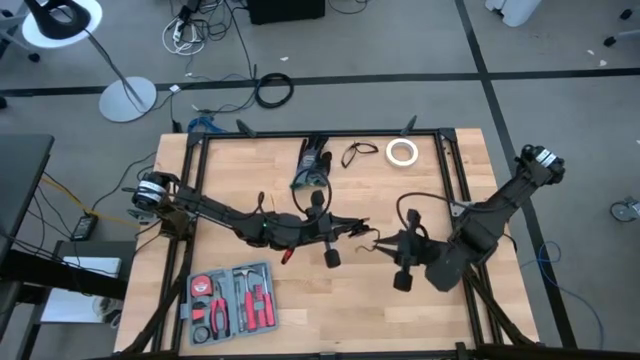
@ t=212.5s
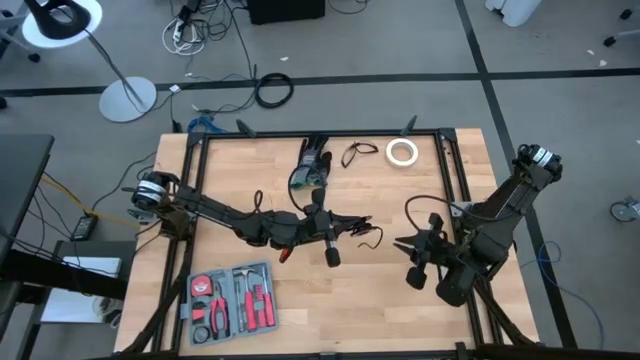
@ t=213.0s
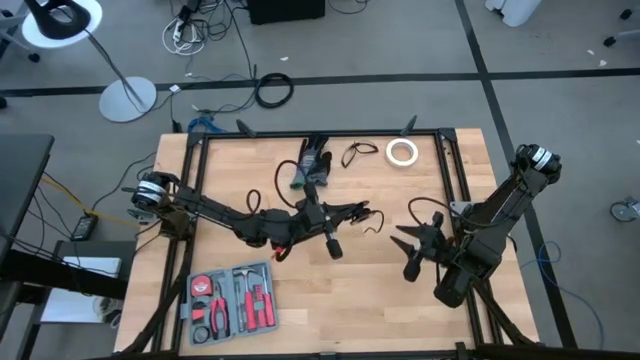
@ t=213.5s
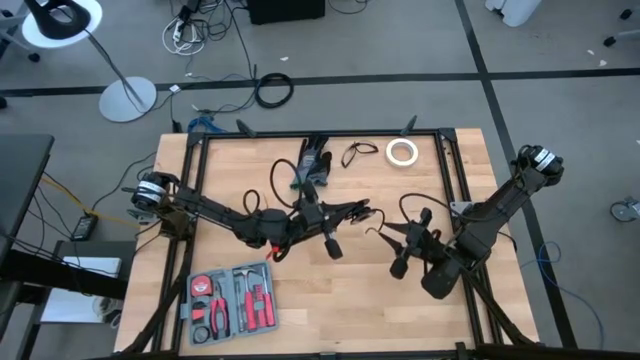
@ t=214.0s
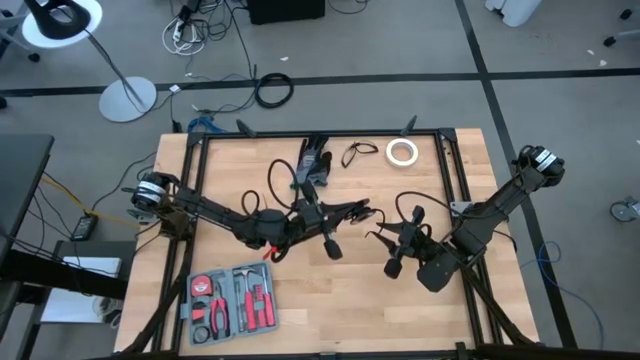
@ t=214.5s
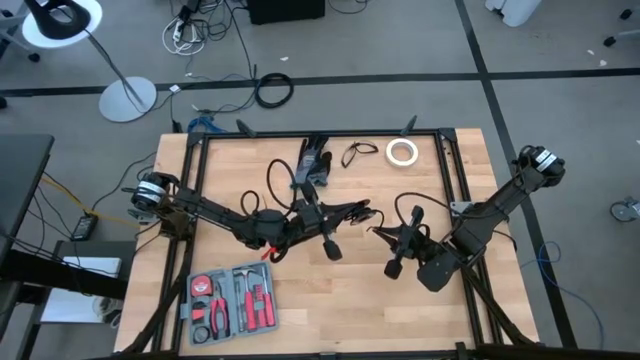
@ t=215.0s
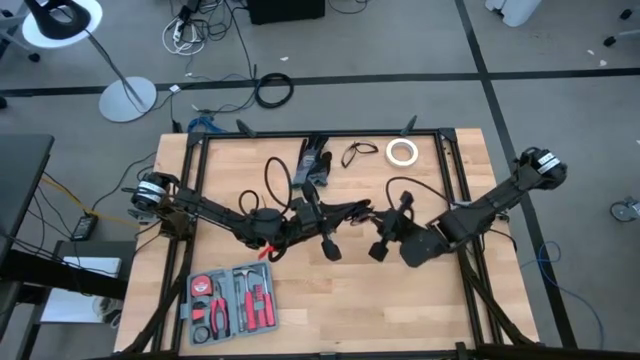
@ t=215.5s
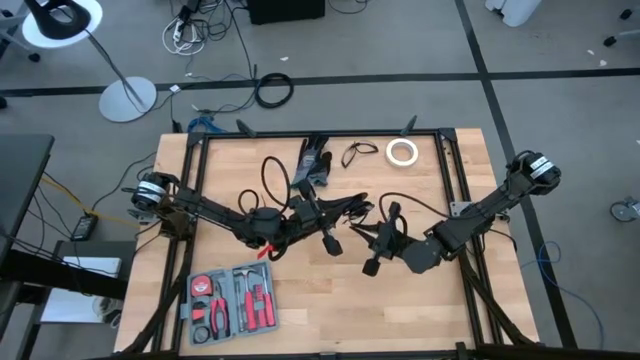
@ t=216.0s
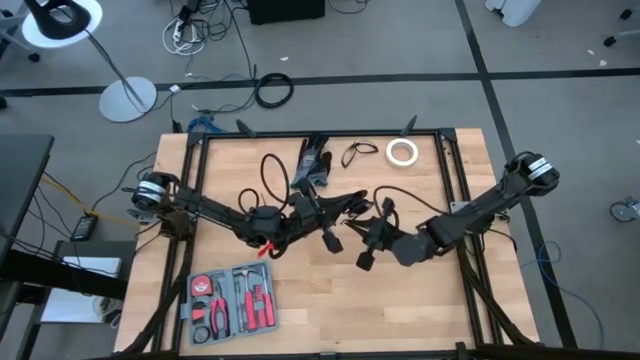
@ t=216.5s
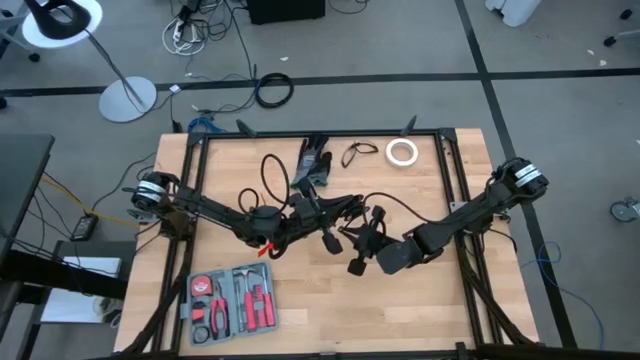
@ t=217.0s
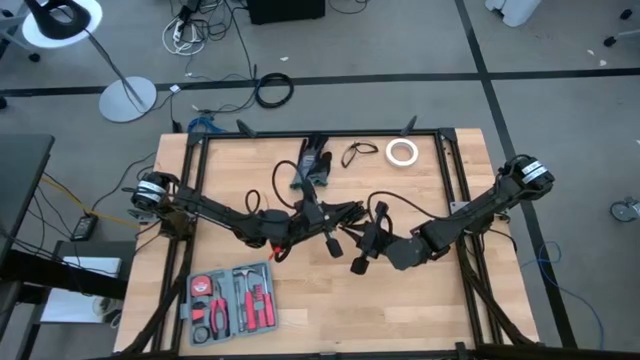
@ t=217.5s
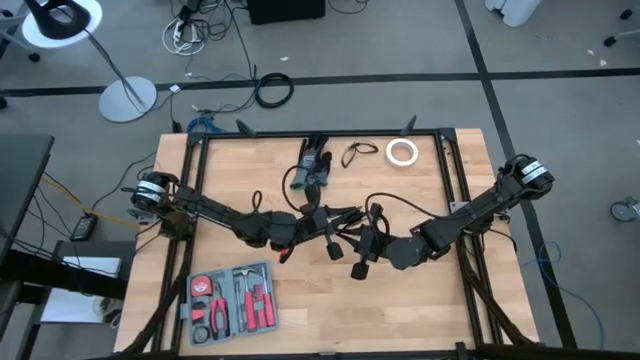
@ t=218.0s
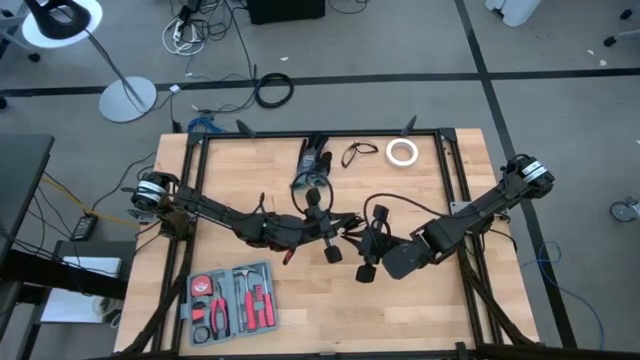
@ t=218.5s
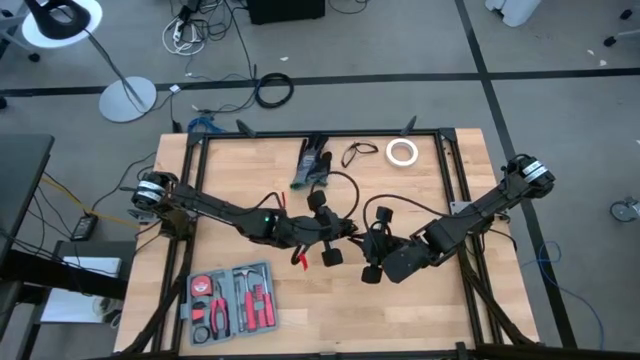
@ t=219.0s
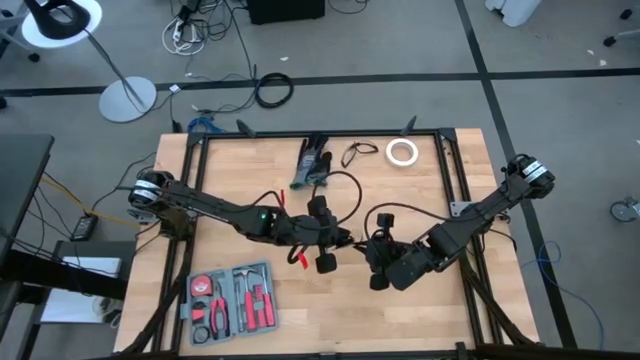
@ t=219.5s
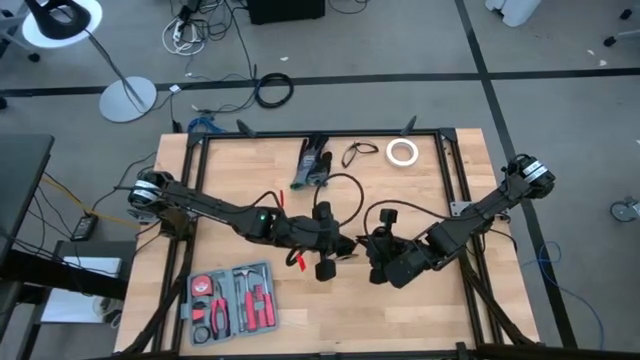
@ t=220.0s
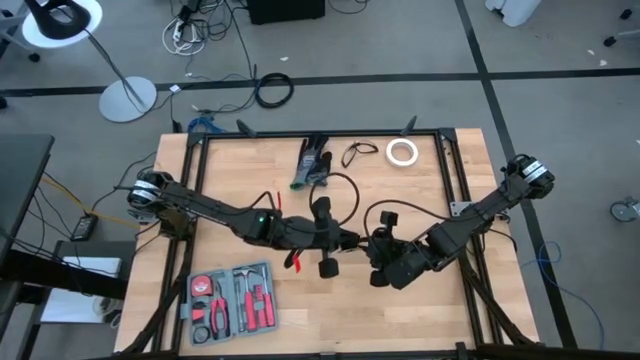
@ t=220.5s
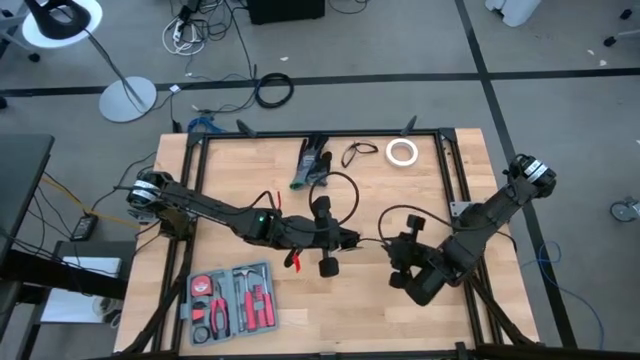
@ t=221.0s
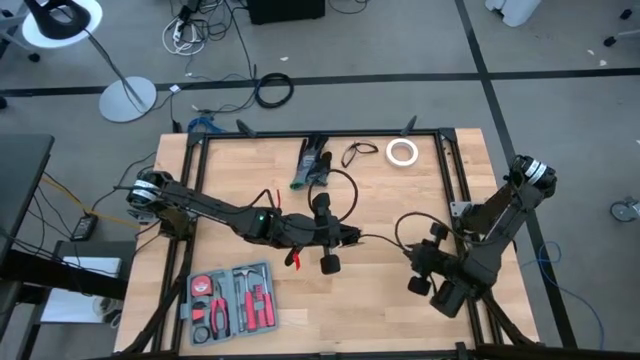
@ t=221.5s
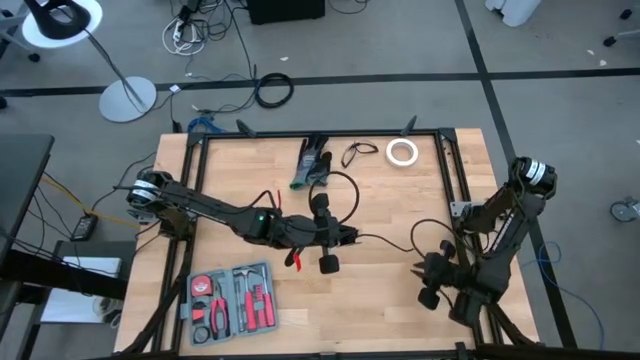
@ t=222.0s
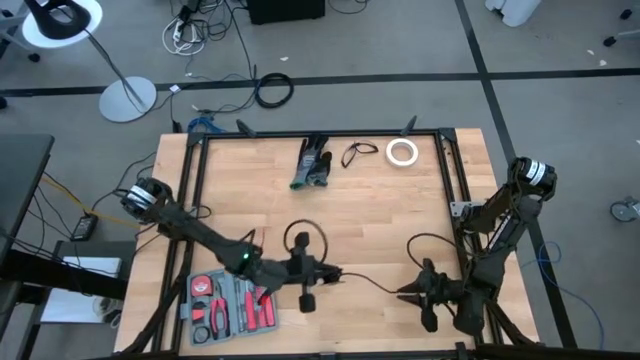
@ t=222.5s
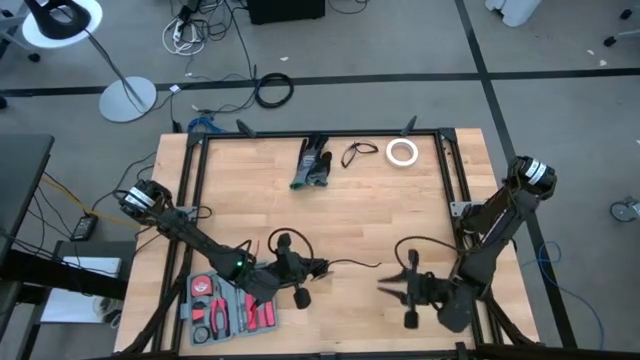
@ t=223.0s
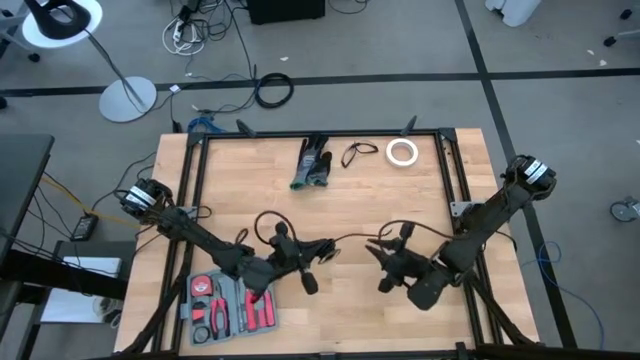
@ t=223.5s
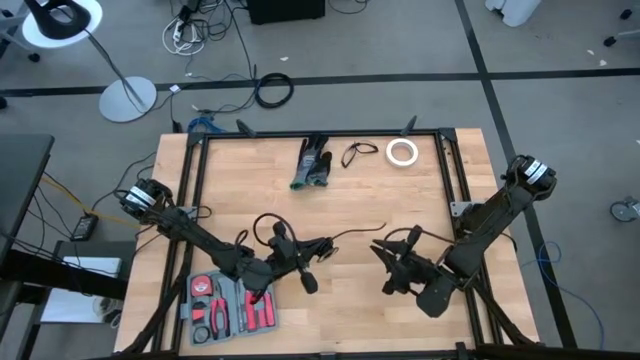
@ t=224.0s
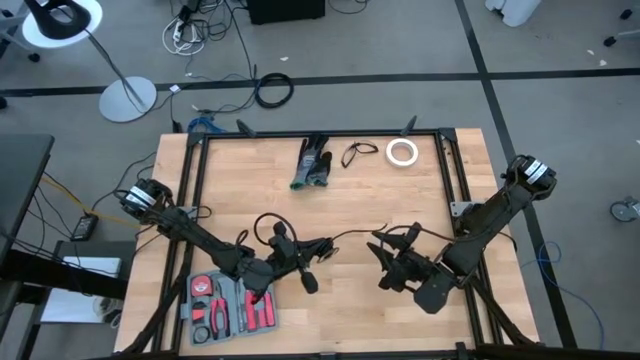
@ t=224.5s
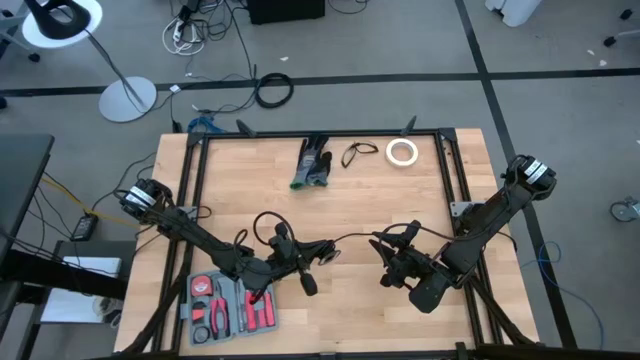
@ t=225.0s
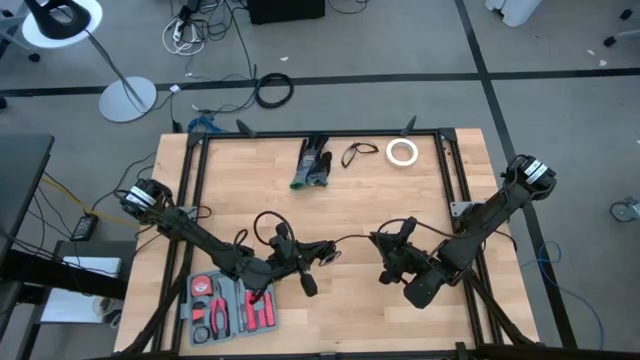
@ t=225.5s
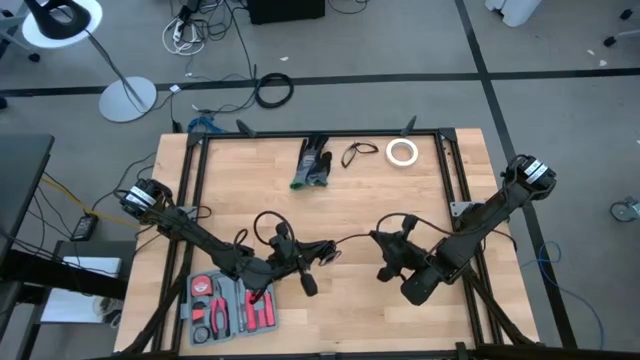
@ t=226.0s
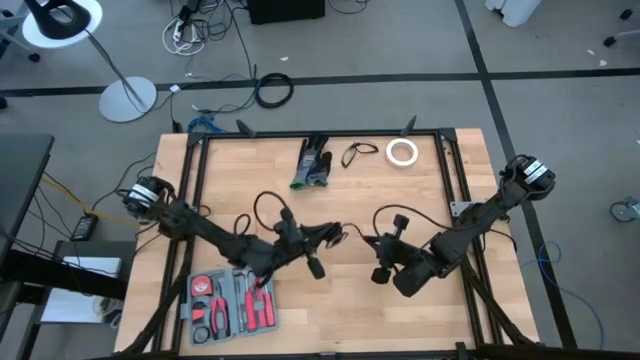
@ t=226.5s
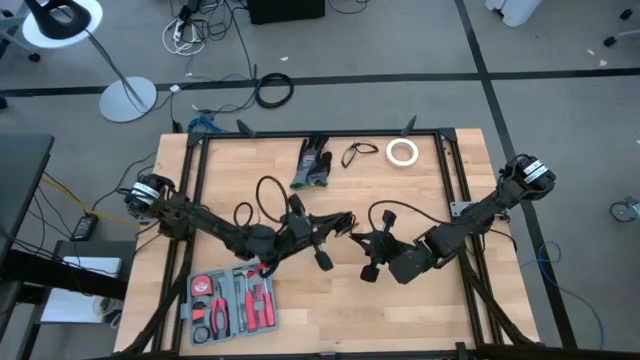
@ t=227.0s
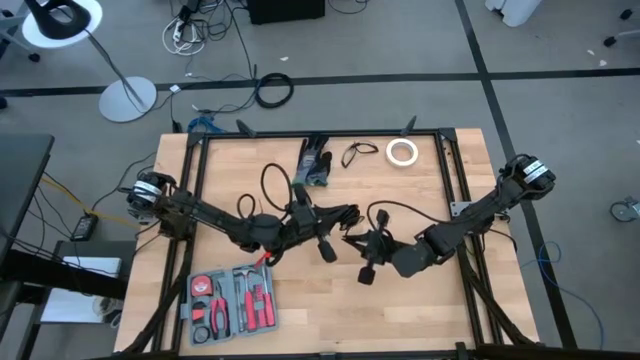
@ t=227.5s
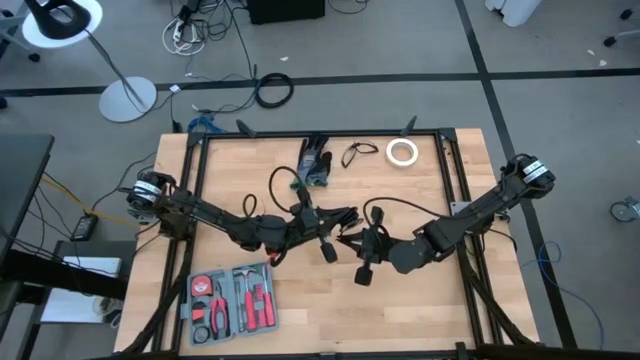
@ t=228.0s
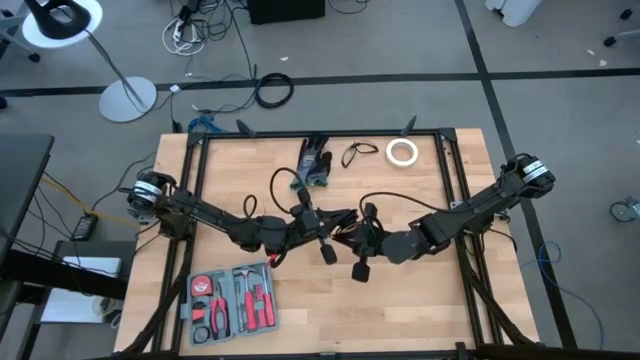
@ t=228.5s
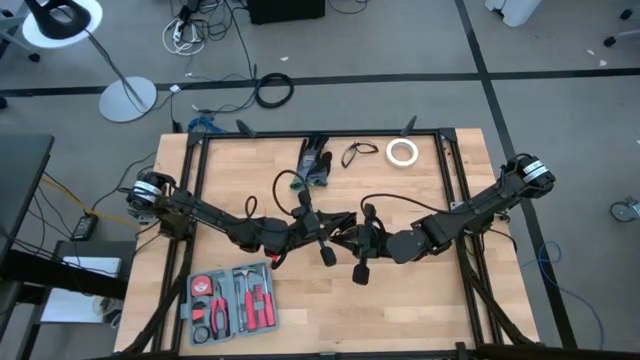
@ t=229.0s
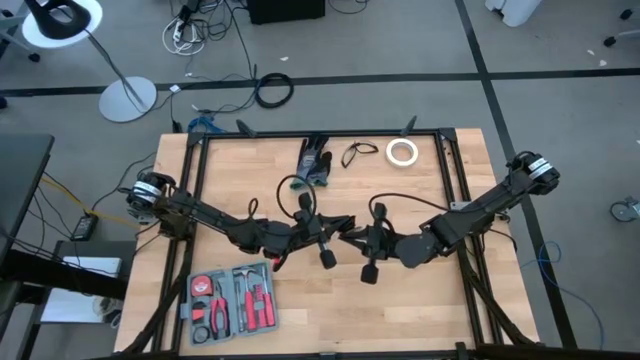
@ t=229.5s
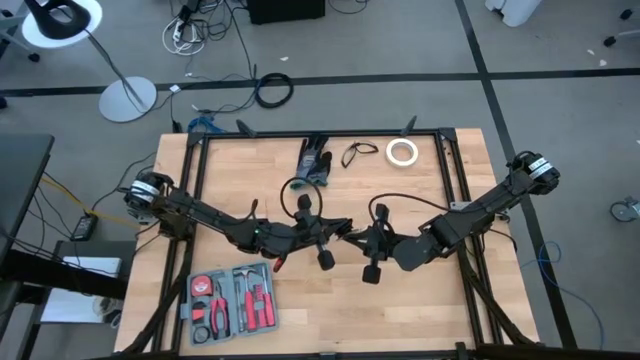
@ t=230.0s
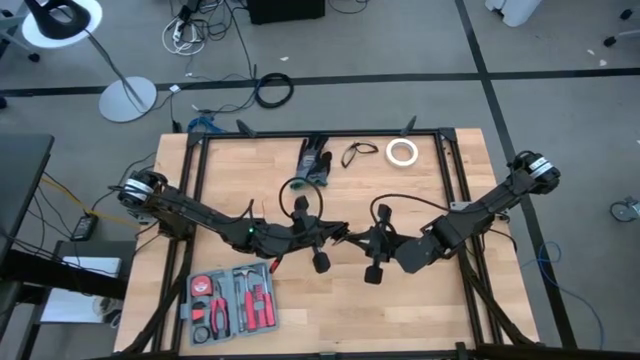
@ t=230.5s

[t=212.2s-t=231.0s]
Task: Coil cords
Coil the black wire into a spool

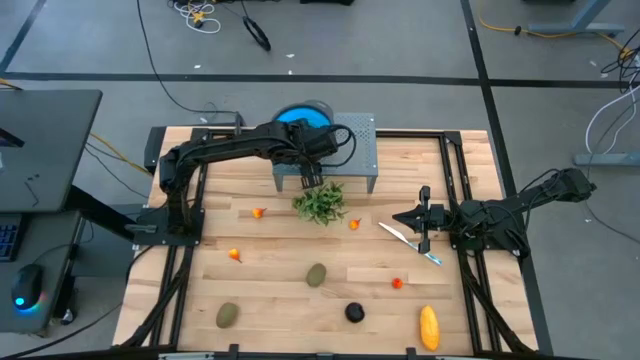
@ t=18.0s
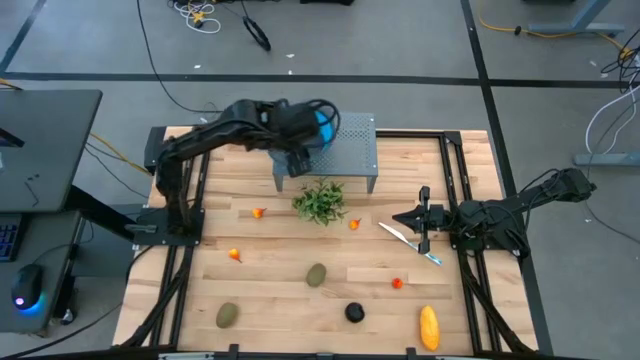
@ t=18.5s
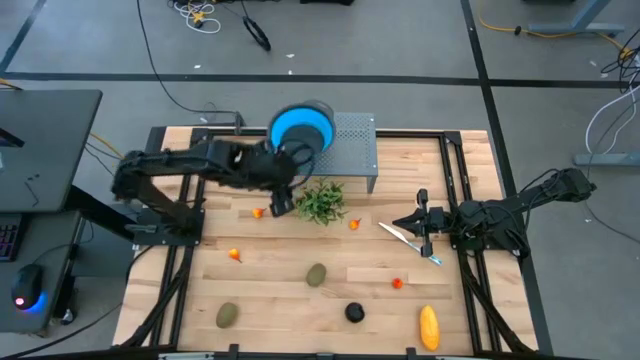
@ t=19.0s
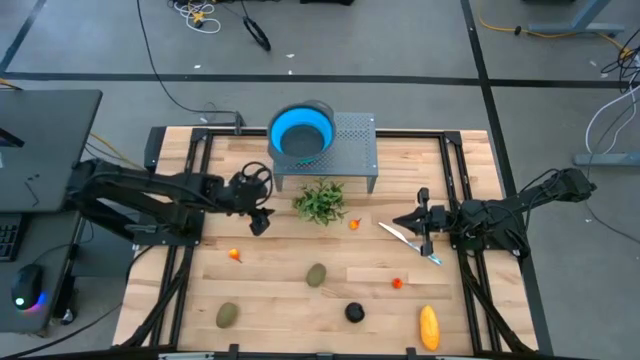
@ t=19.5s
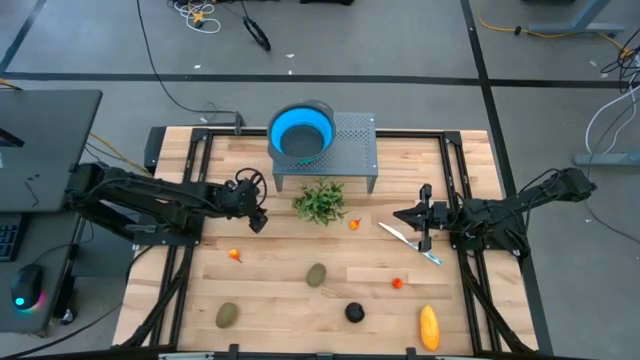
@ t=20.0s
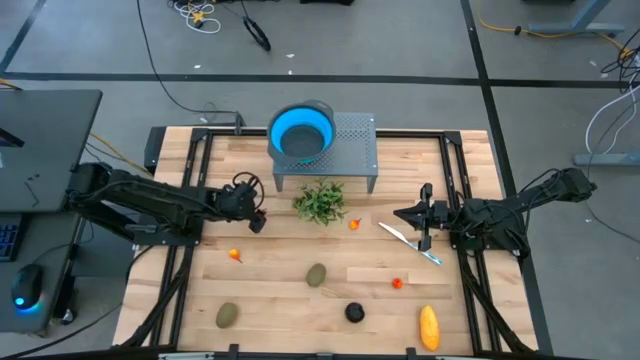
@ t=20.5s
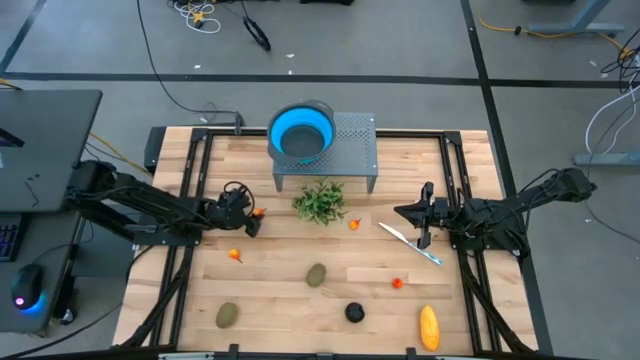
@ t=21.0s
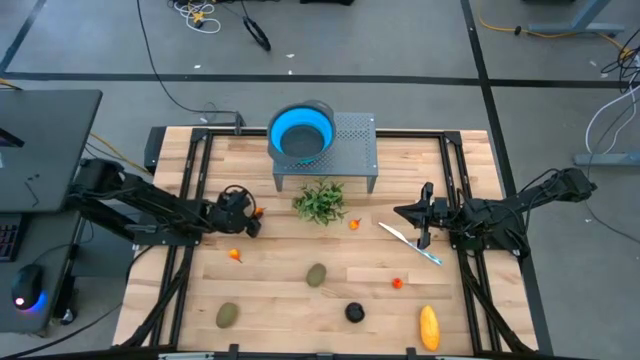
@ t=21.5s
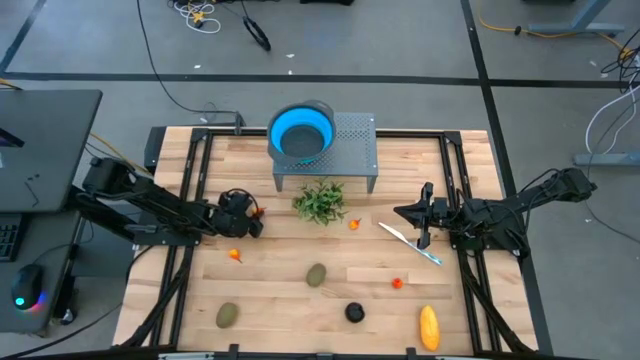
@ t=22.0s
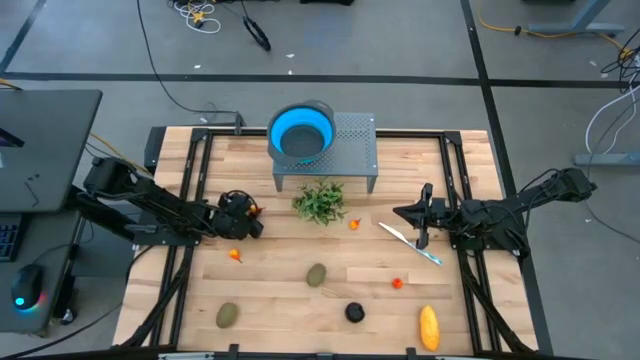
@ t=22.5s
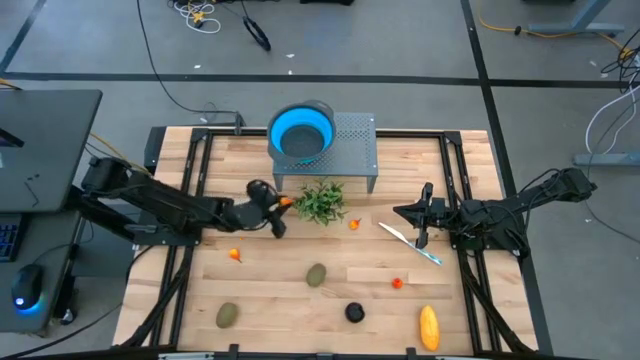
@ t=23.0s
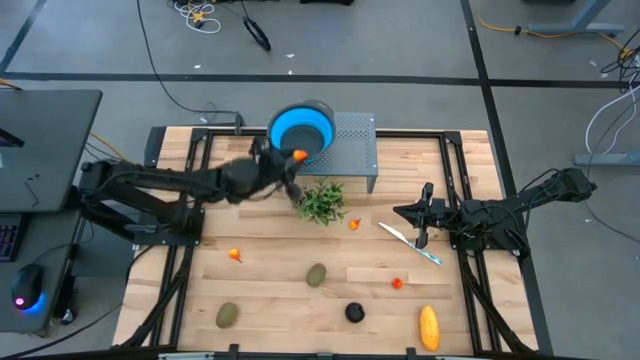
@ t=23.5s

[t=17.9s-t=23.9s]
Task: Pick & Place Fruit
Put the orange pear into the blue strainer bowl on the shelf
